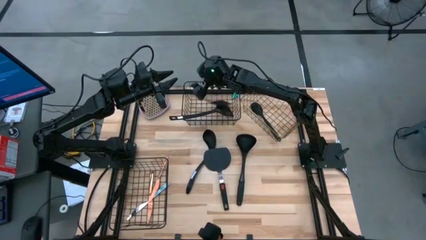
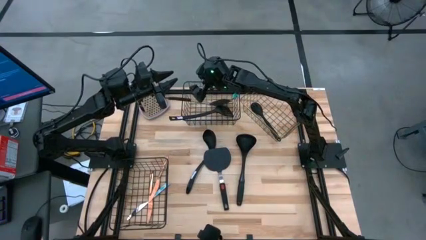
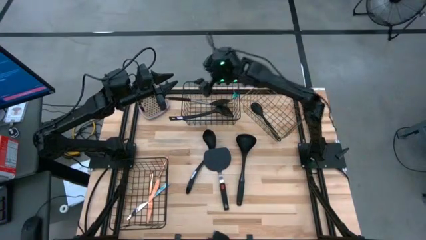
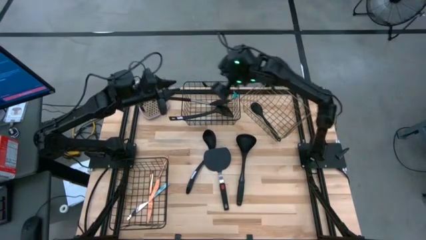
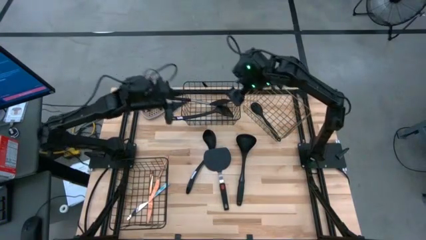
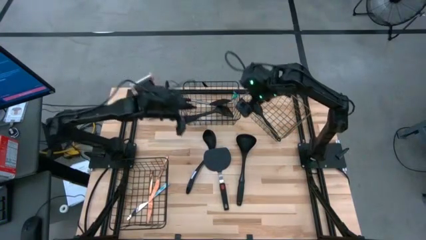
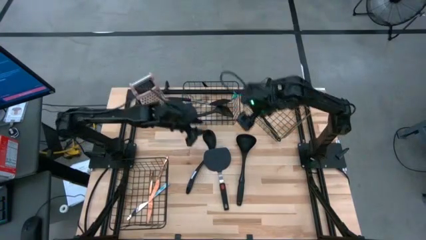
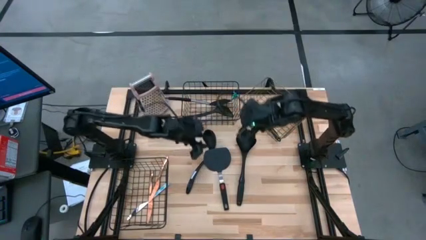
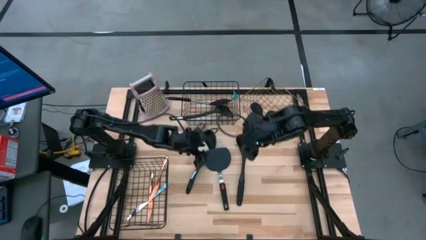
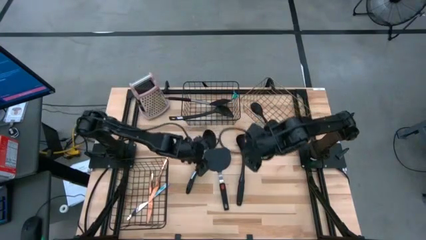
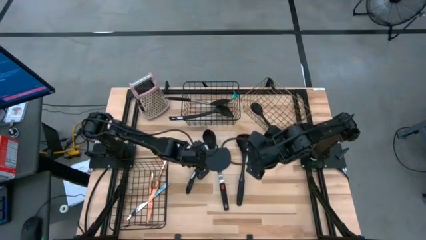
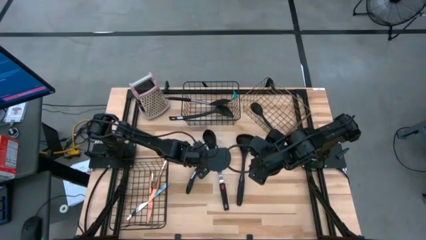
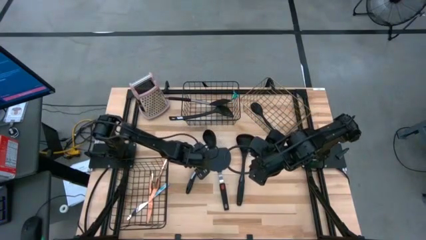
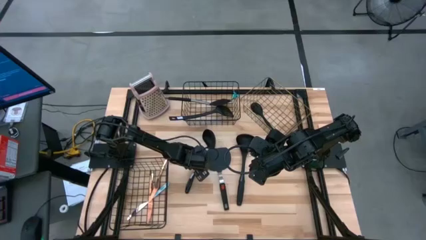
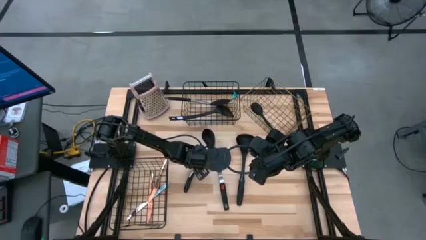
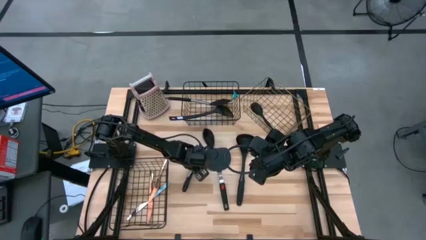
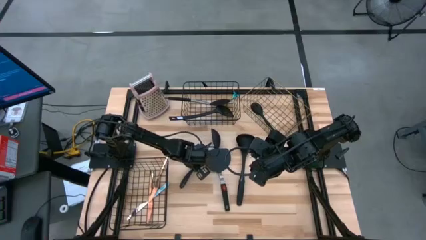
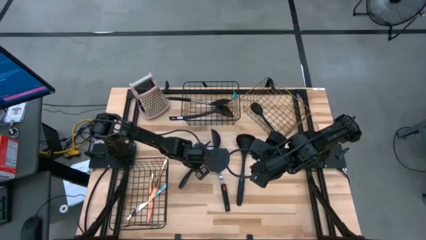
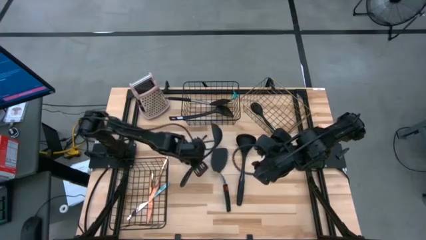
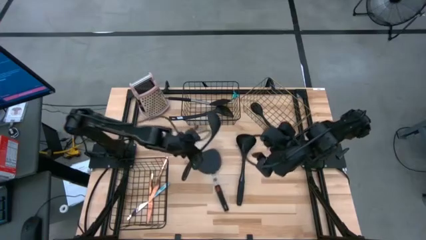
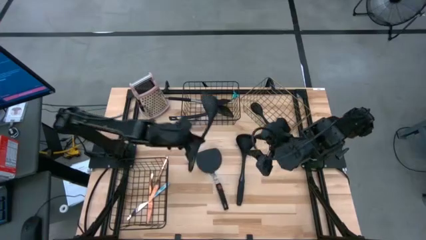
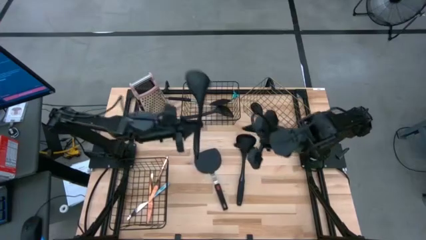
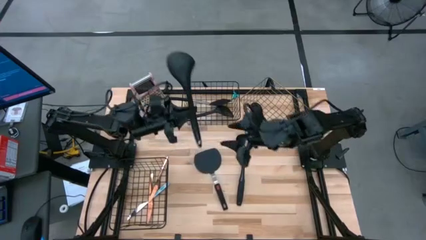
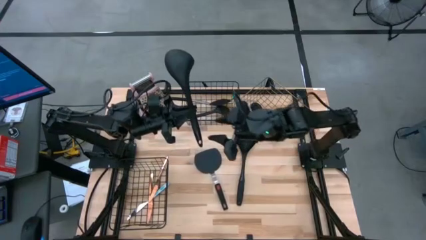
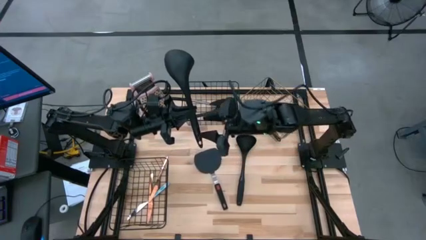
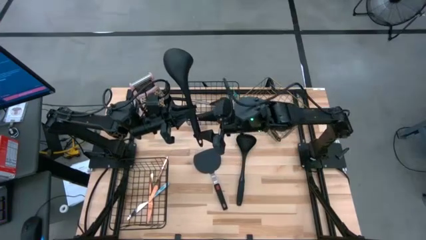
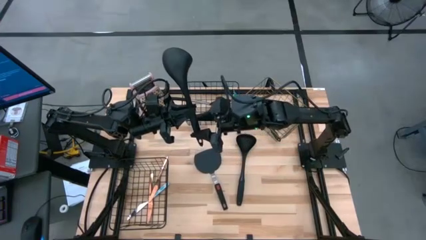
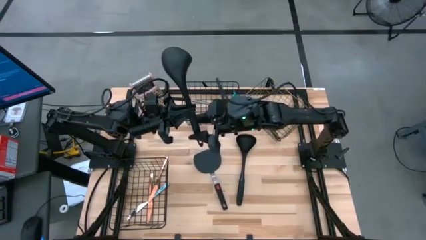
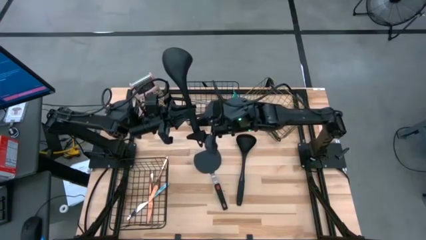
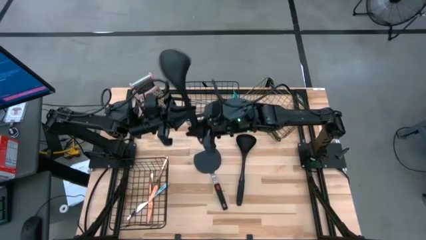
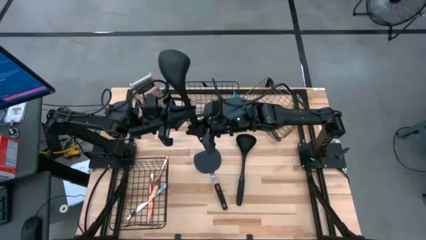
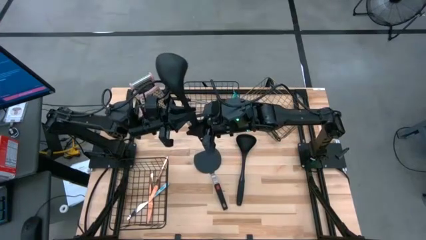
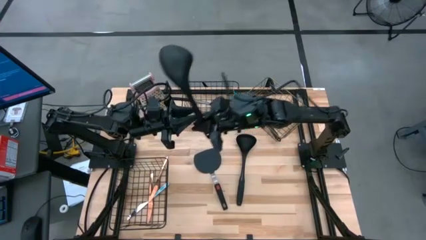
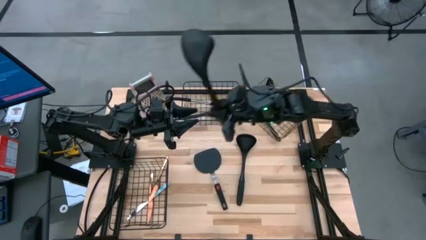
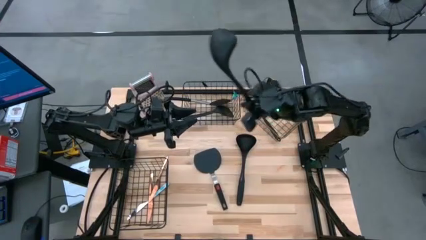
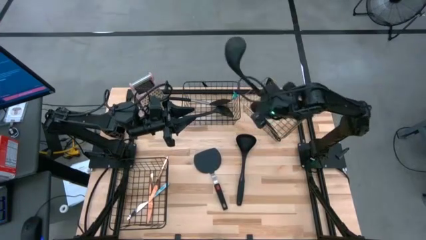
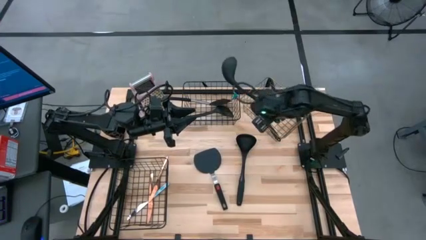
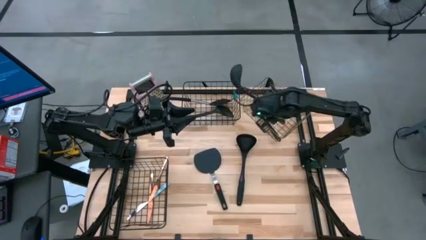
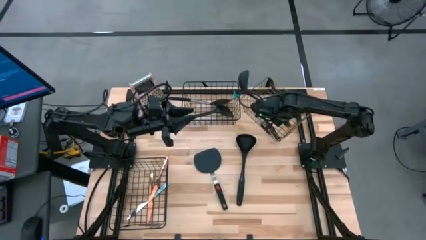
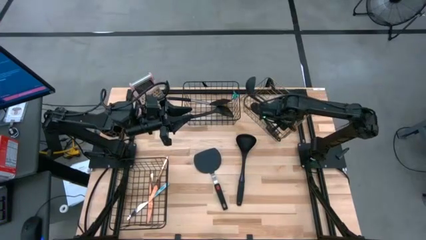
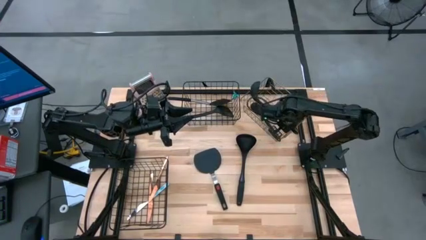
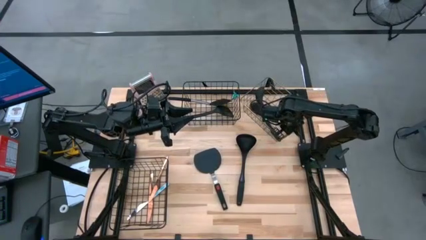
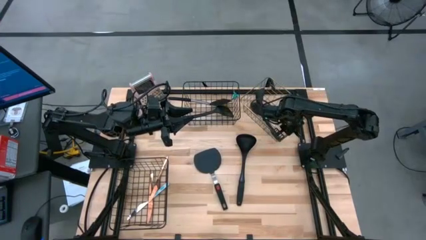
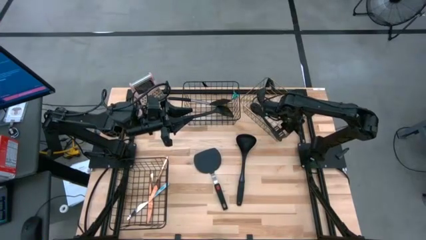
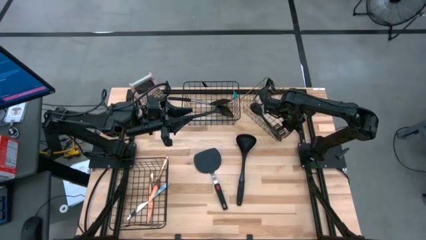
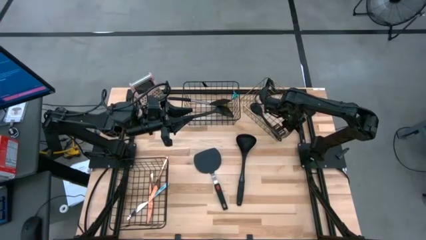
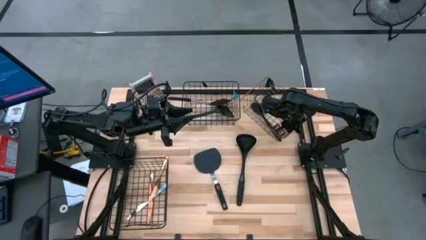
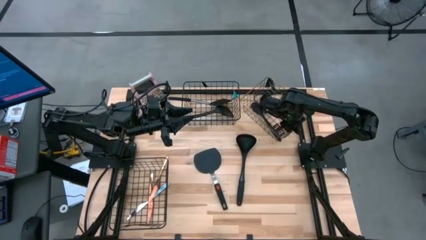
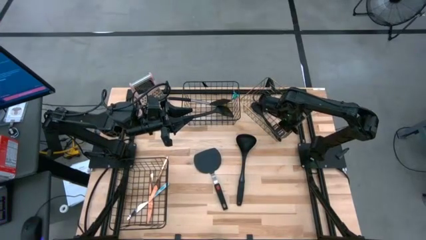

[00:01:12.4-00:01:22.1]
Task: Pick & Place Kitchen Items
Put the left black ladle into the top right wire basket

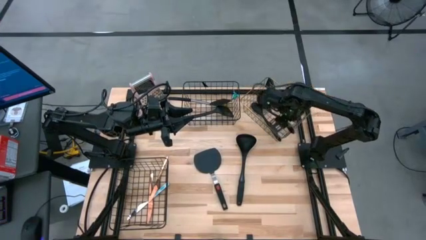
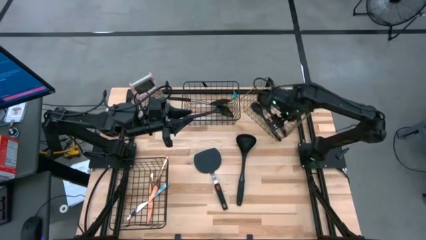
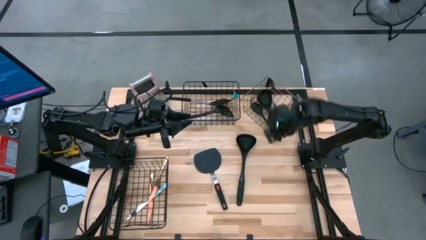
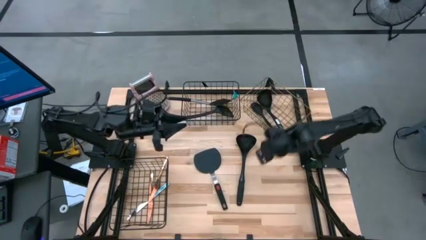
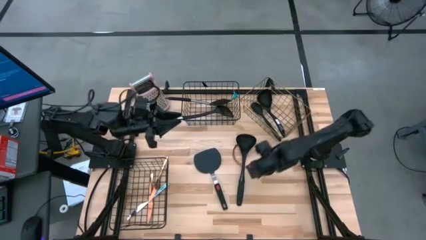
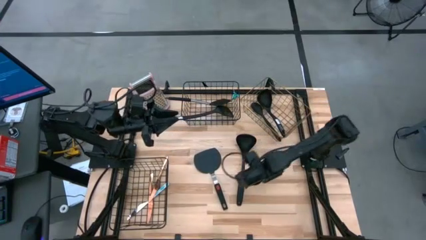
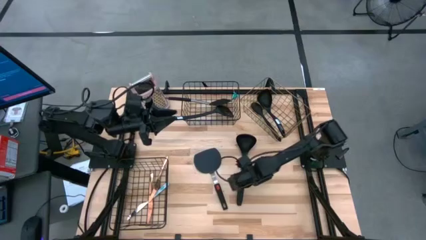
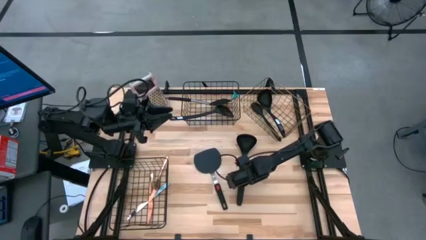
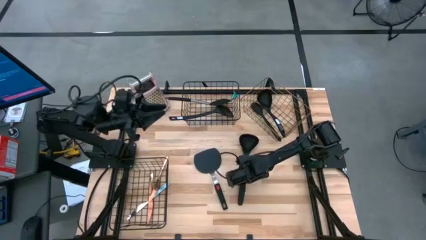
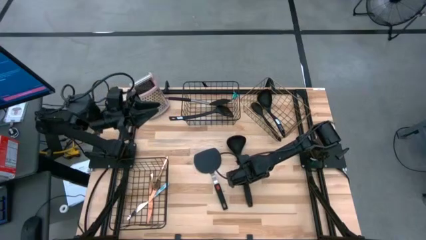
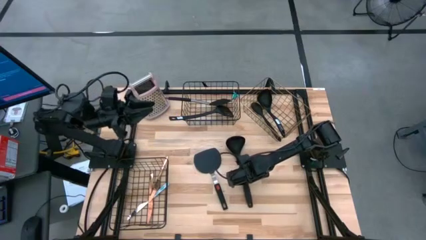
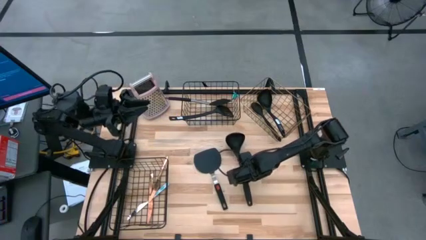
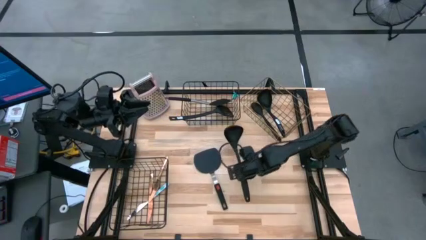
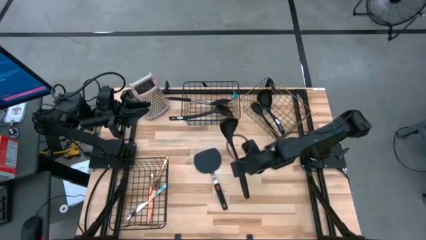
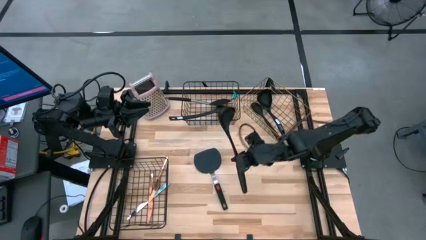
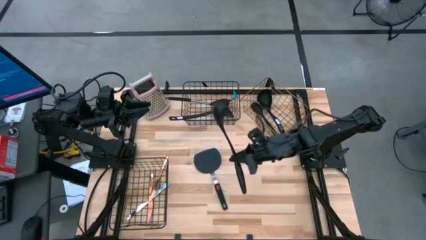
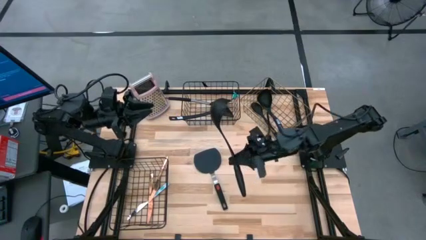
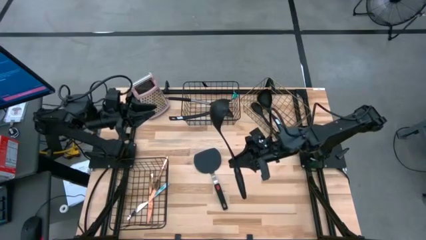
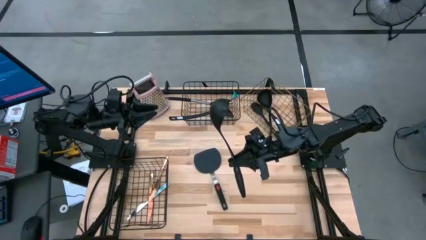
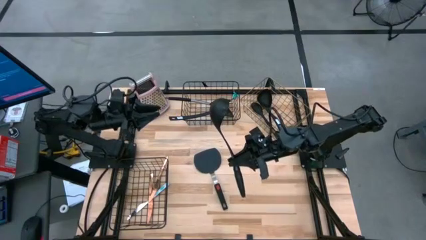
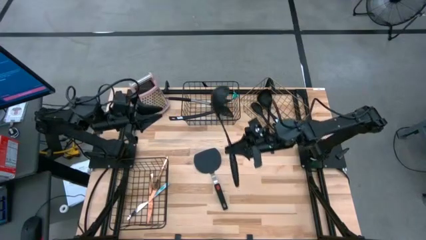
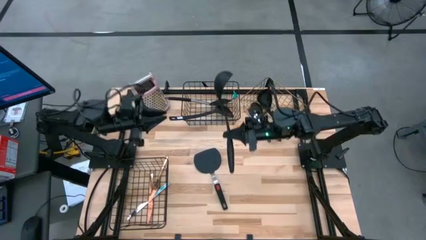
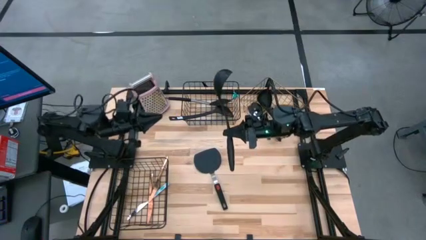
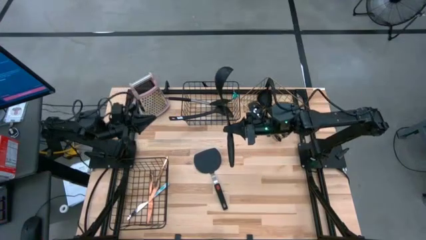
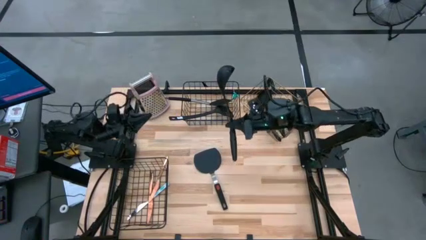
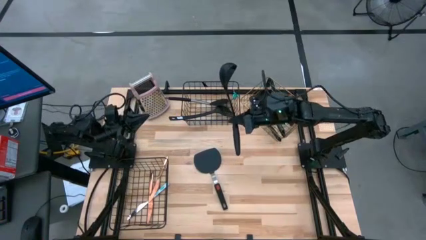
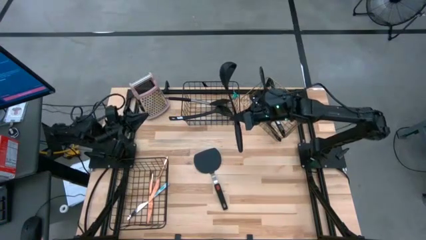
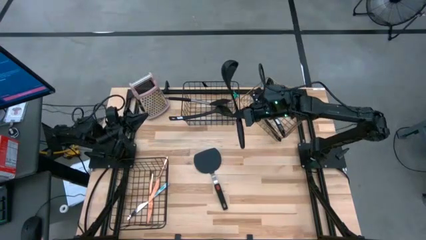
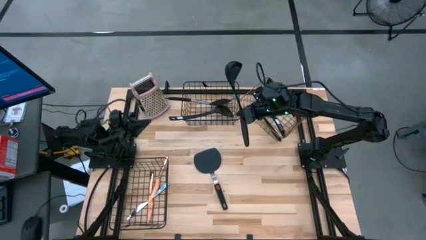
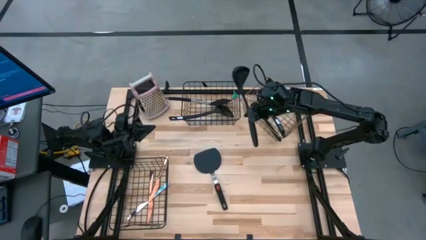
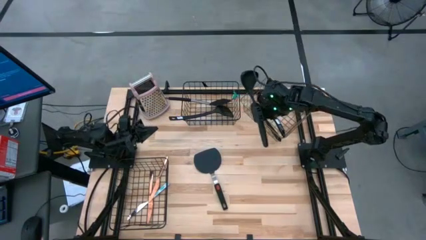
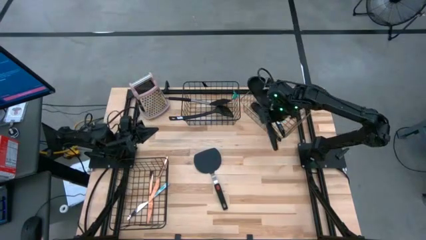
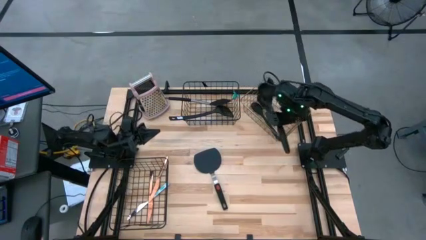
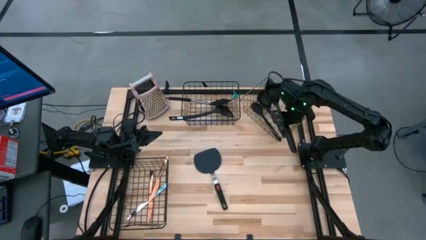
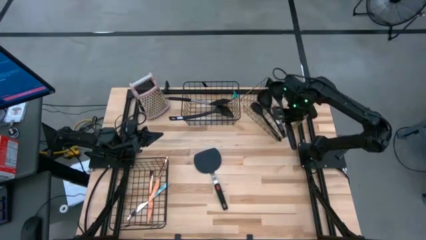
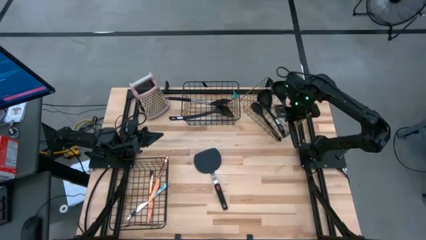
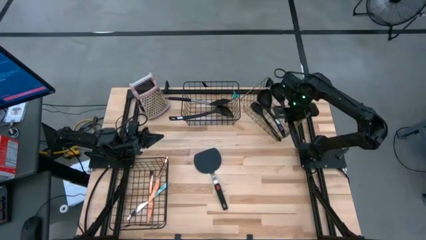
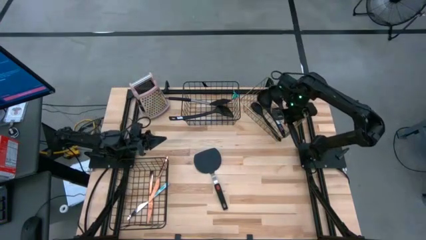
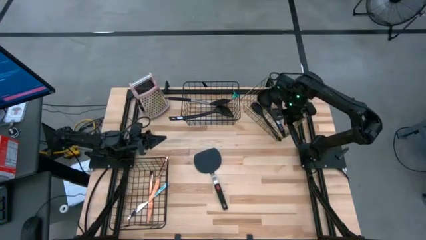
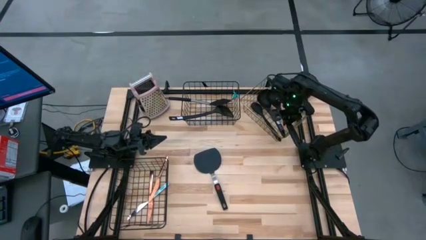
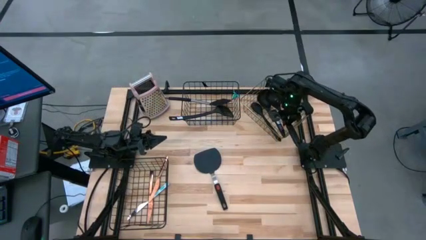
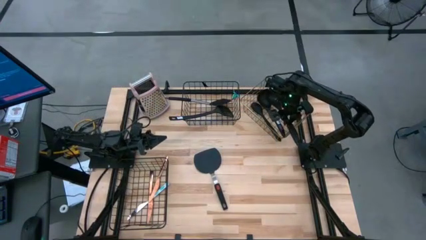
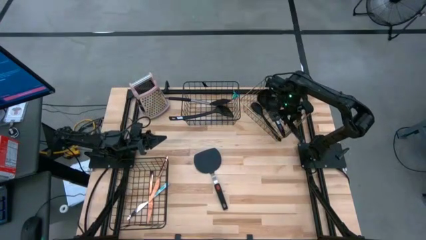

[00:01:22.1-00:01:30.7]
Put the black ladle into the top right wire basket
